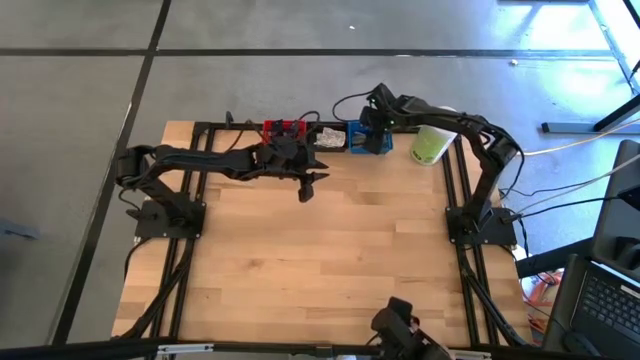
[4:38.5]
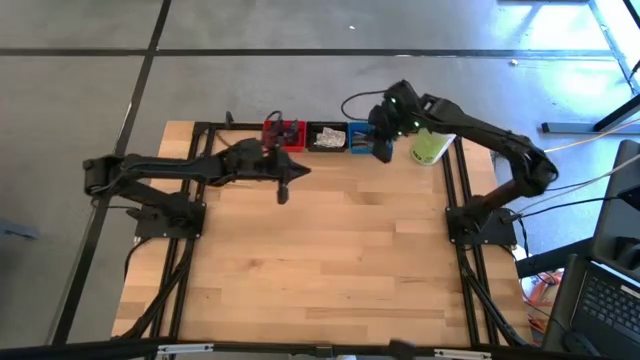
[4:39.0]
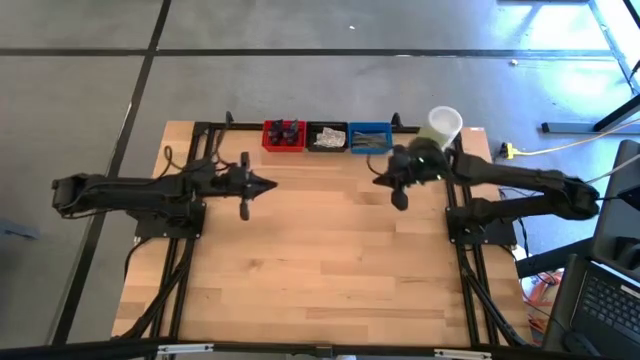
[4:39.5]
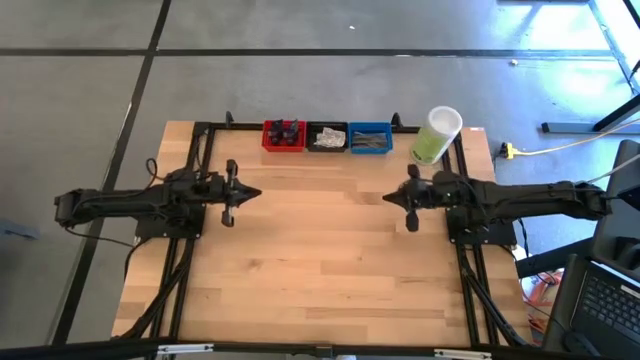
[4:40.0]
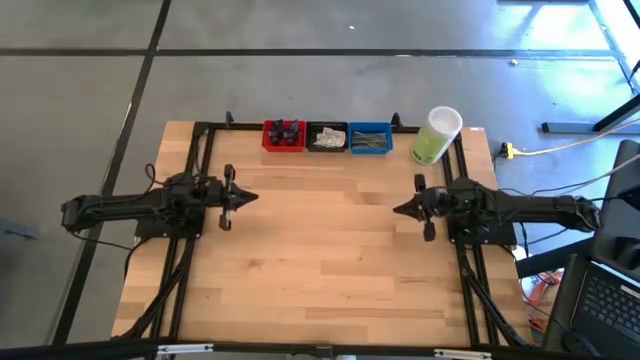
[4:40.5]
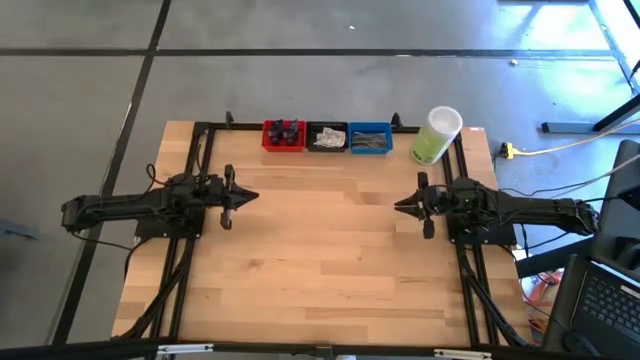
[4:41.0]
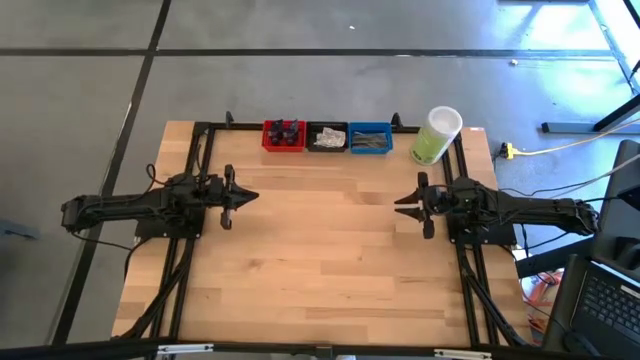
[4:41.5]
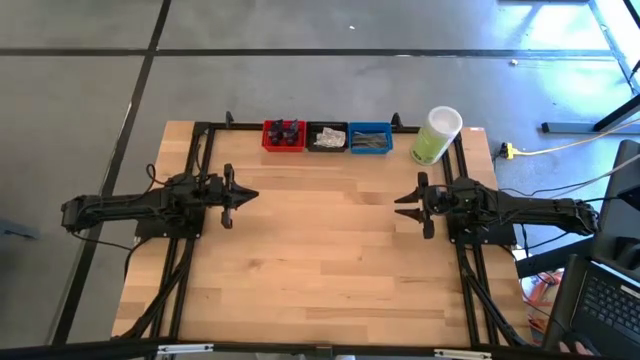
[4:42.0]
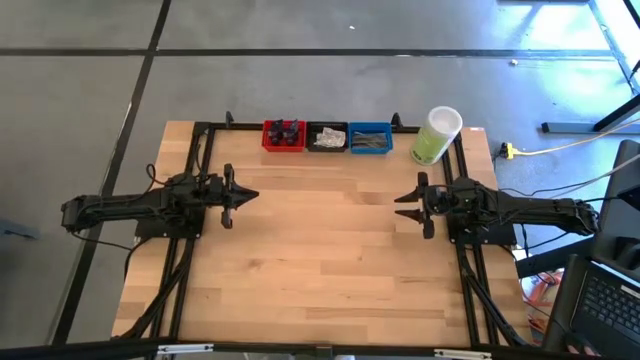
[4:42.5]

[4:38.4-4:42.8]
Task: Pick & Place Travel size toiletries
Return to Home Position

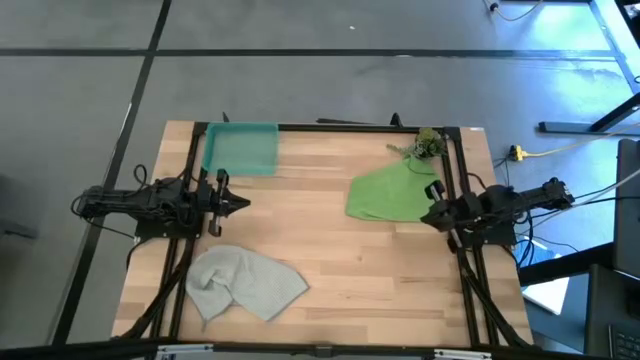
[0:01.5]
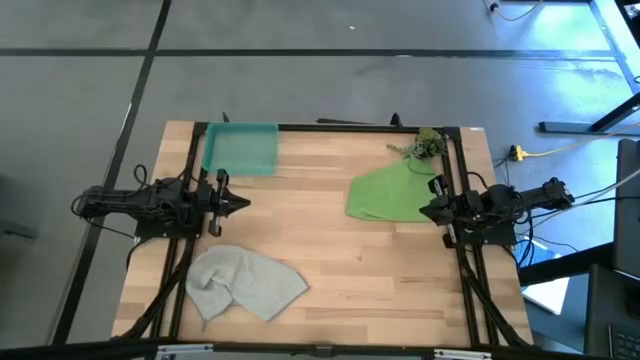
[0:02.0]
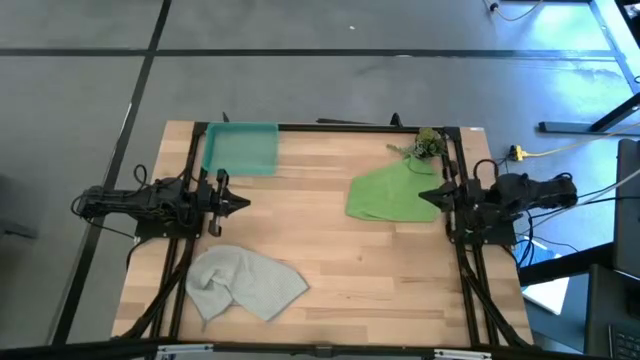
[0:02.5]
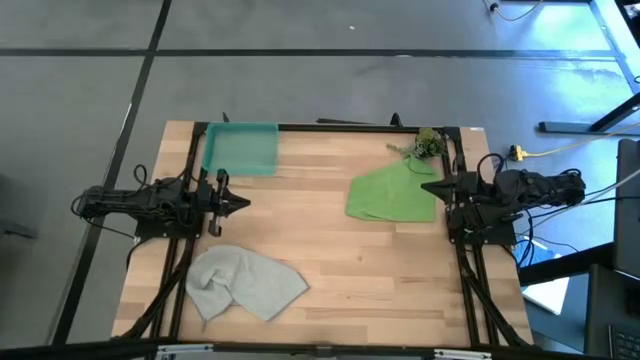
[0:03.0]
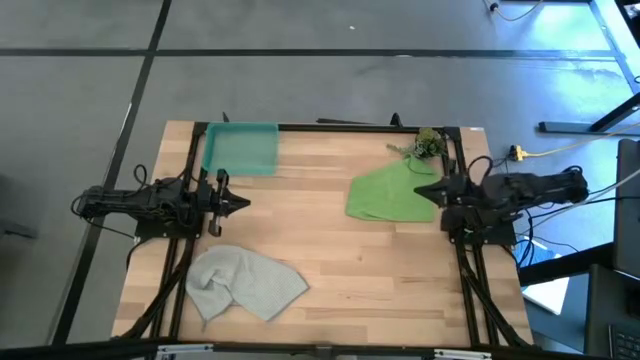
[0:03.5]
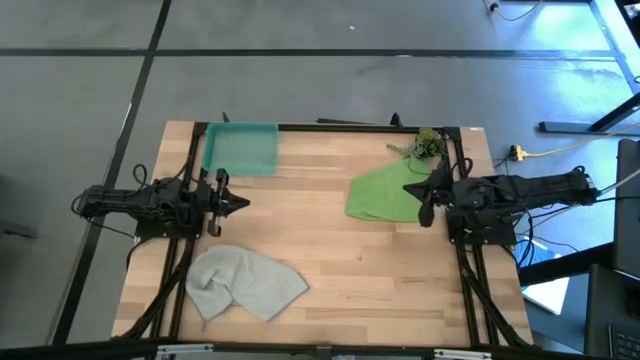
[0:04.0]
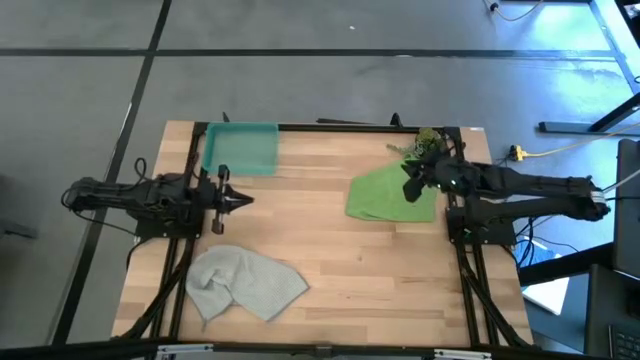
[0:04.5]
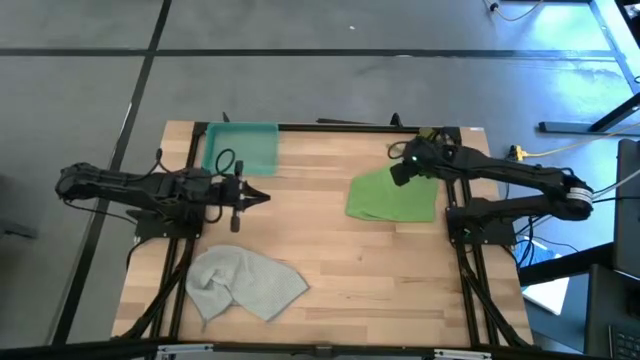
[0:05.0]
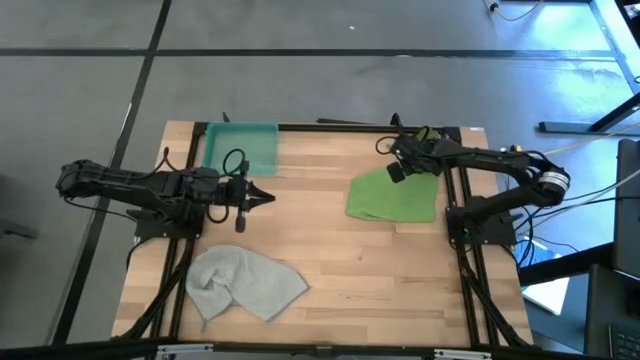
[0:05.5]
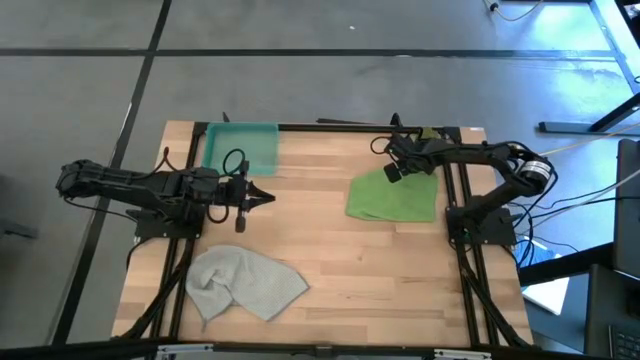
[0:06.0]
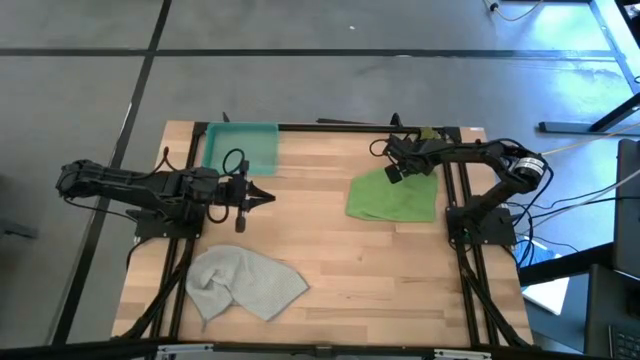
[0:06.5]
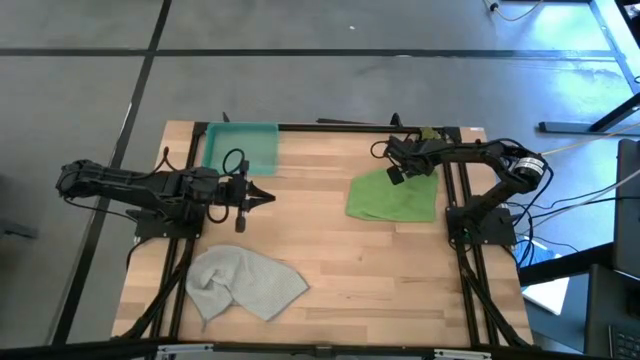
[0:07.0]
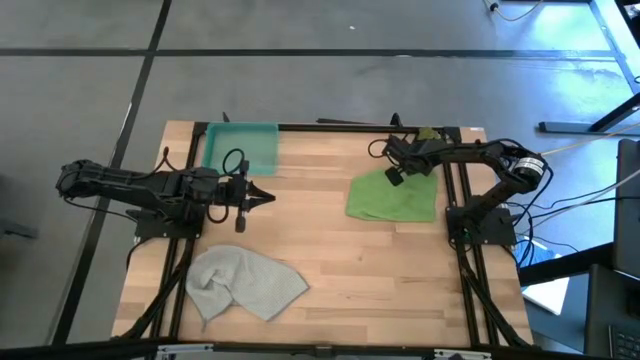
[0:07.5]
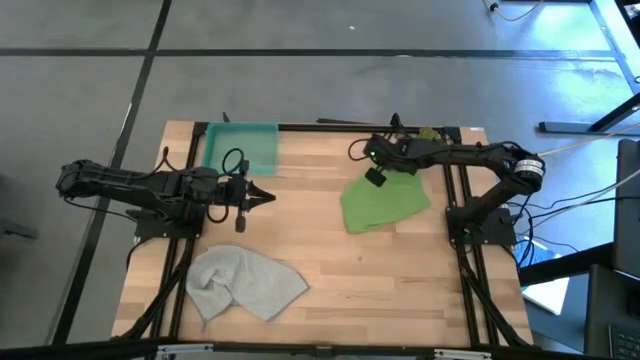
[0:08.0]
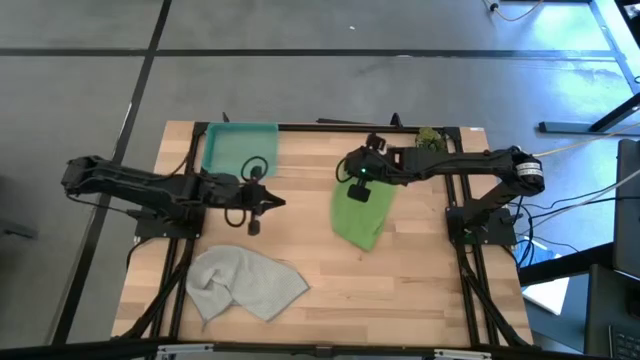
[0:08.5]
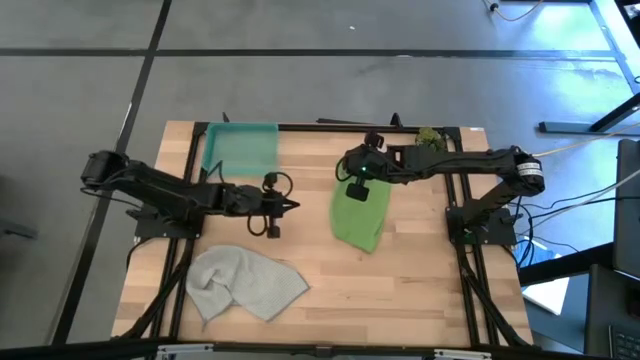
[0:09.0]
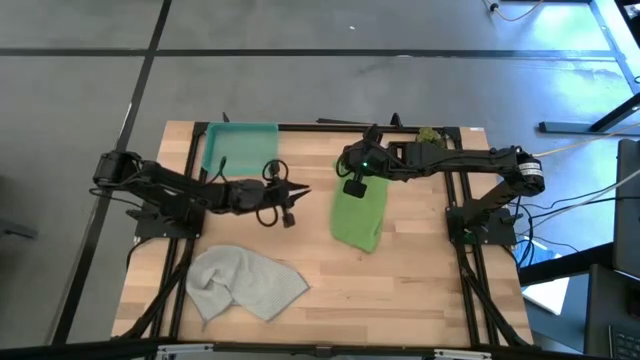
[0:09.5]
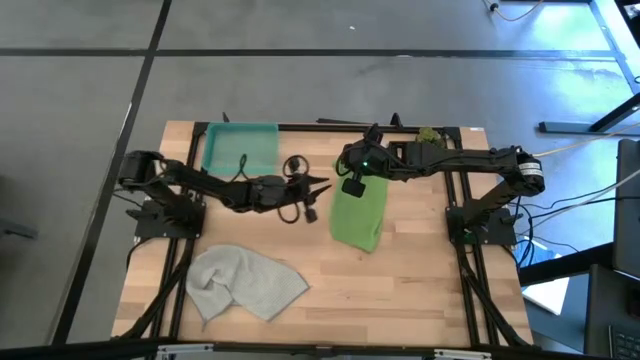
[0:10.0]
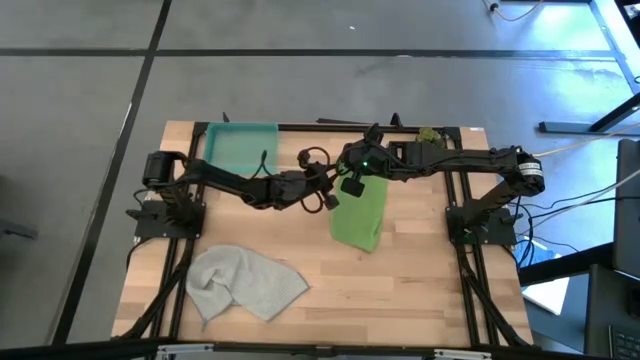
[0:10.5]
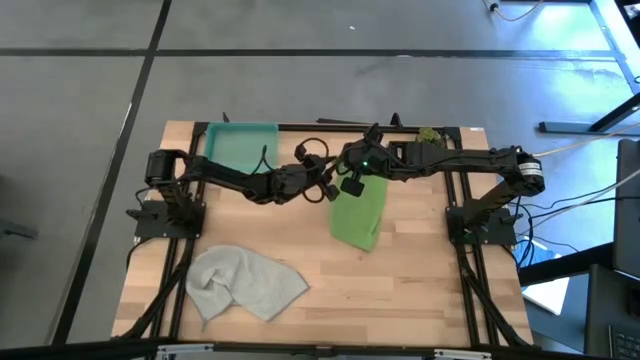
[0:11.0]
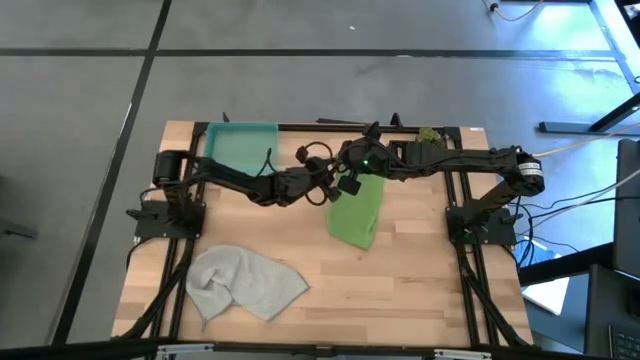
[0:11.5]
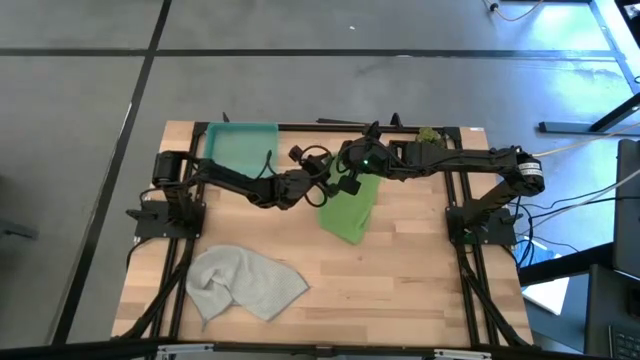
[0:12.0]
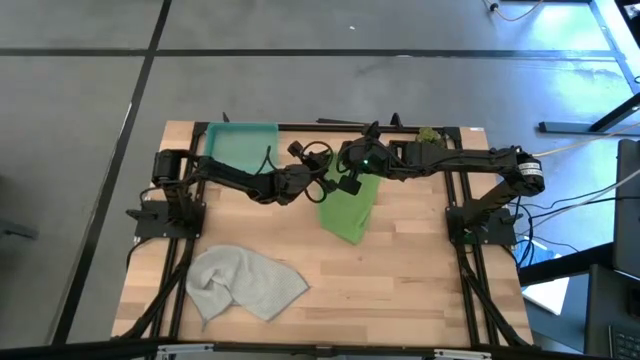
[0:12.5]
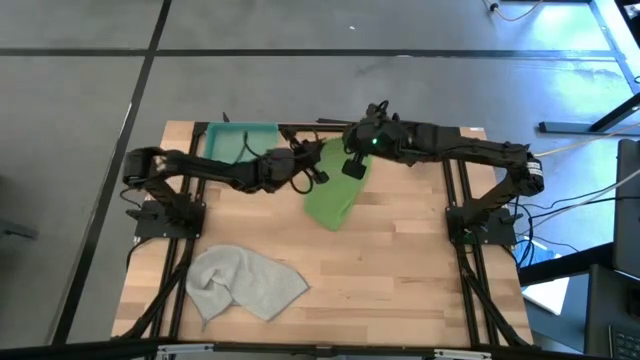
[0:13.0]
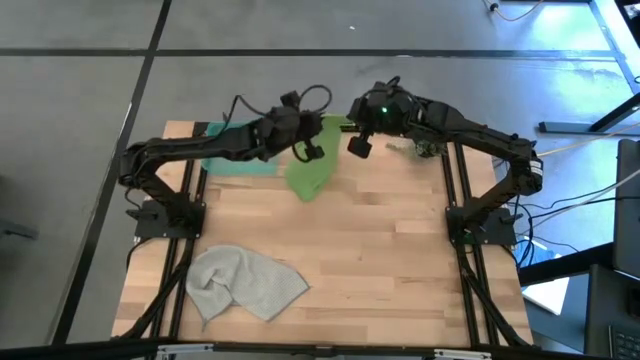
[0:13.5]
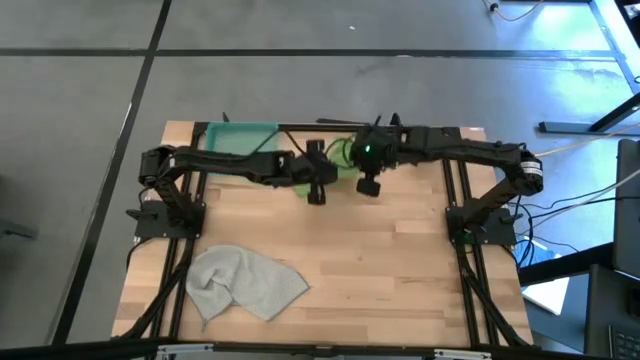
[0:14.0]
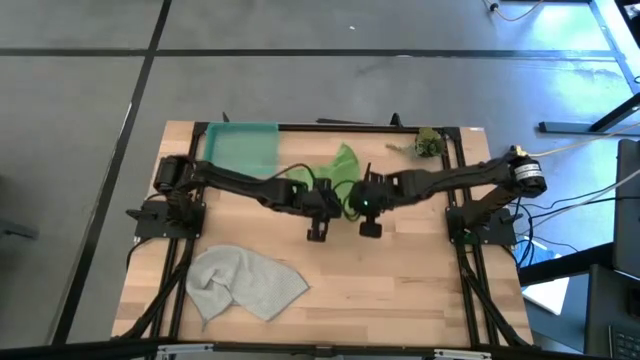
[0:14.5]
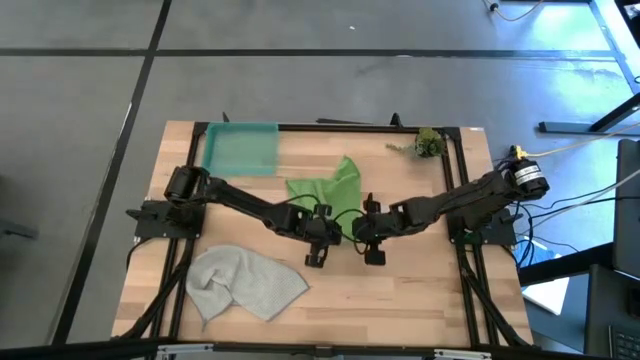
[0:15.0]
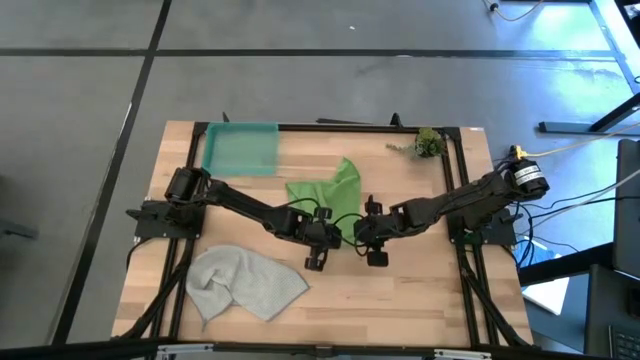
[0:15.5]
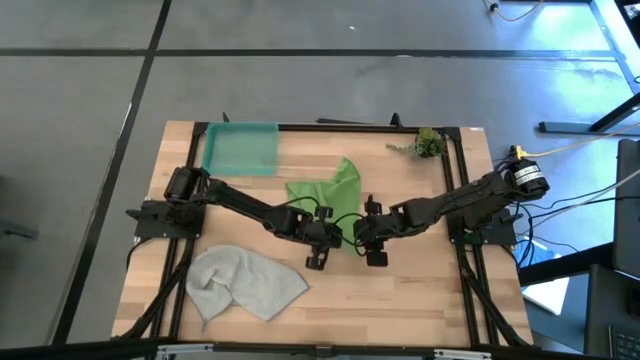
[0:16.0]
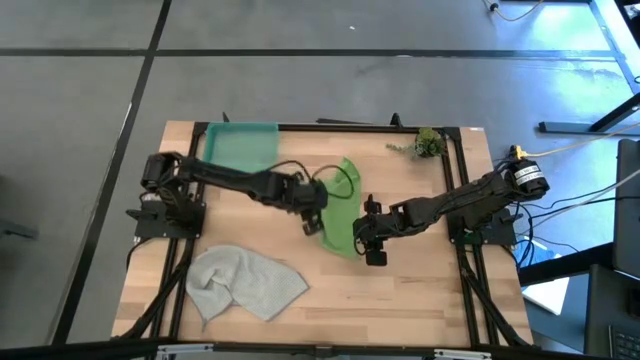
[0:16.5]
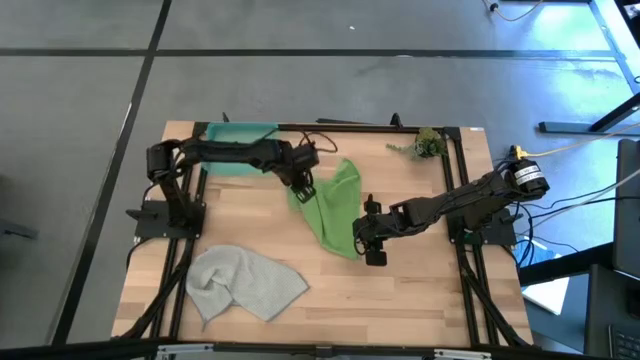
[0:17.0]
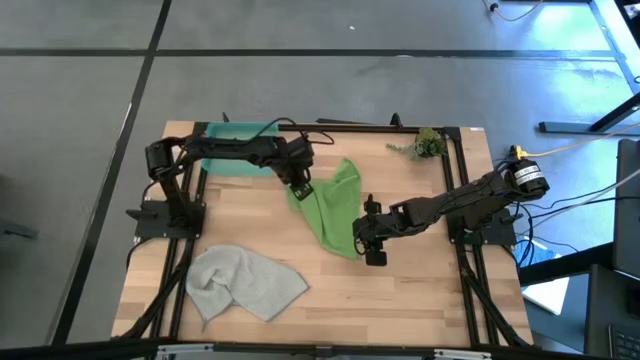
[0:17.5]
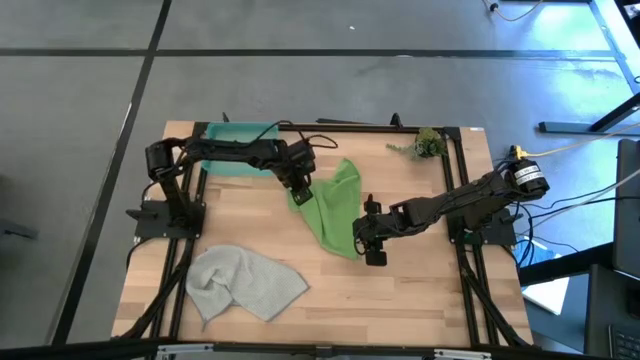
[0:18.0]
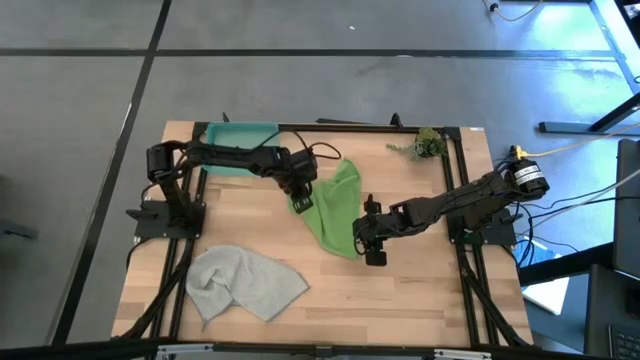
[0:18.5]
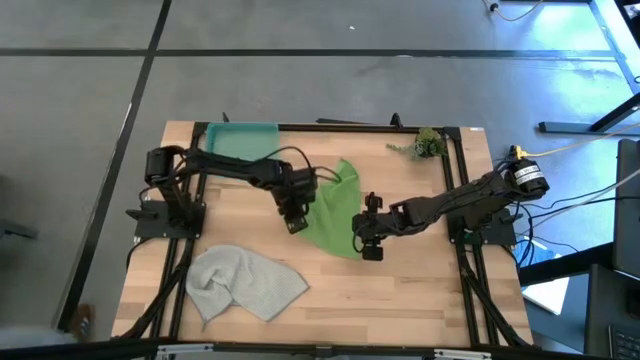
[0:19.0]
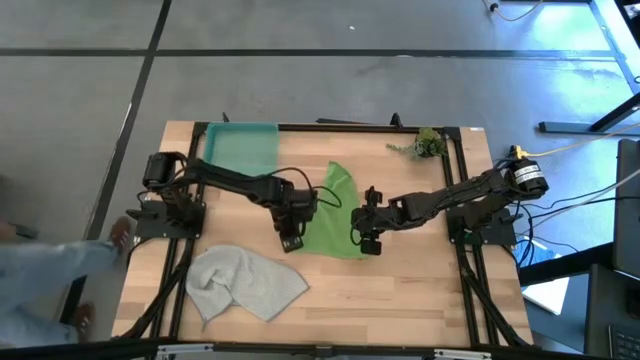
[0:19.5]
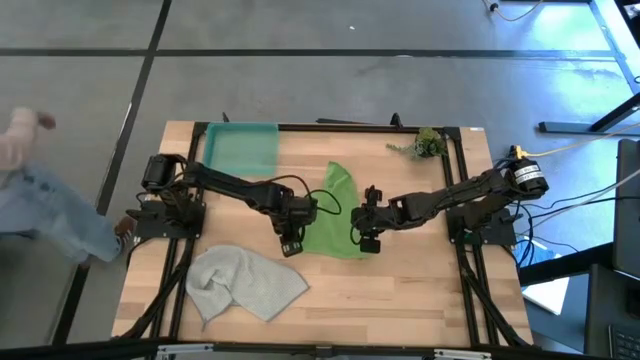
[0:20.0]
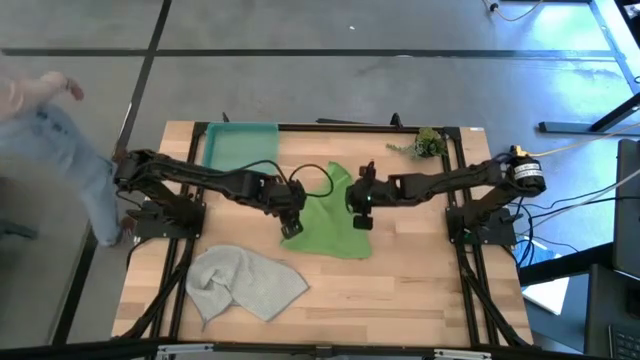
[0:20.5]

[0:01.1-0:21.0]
Task: Roll microfiber towels into tight, uniform cylinder then place into a basket
Roll the green towel
